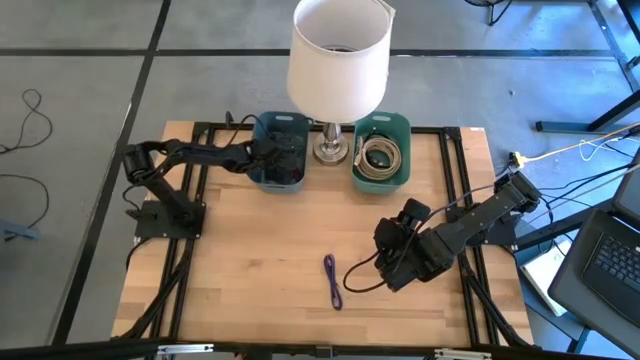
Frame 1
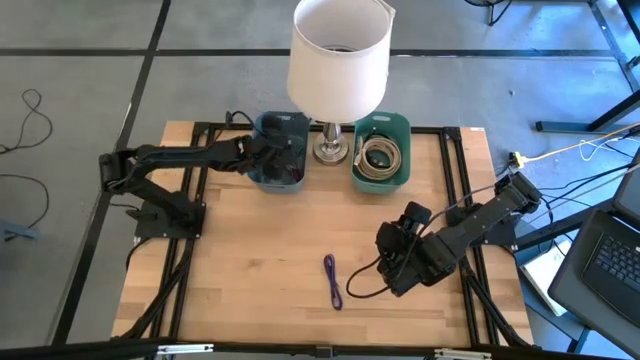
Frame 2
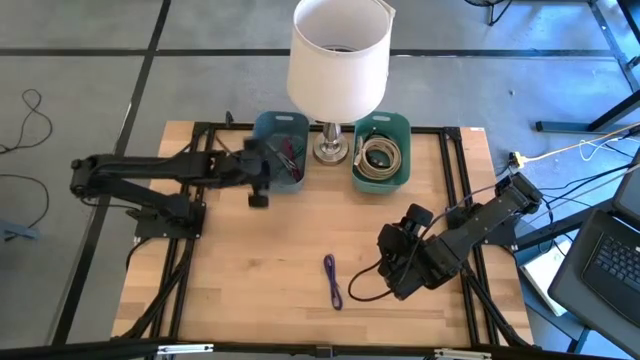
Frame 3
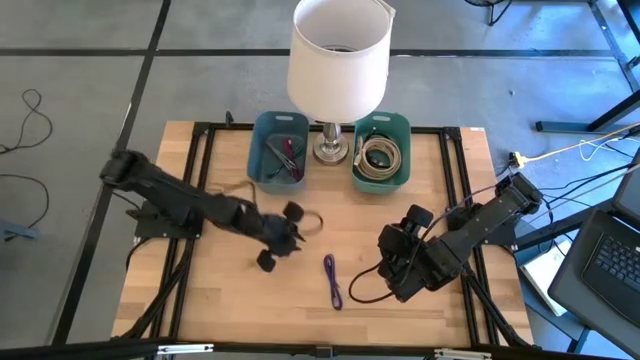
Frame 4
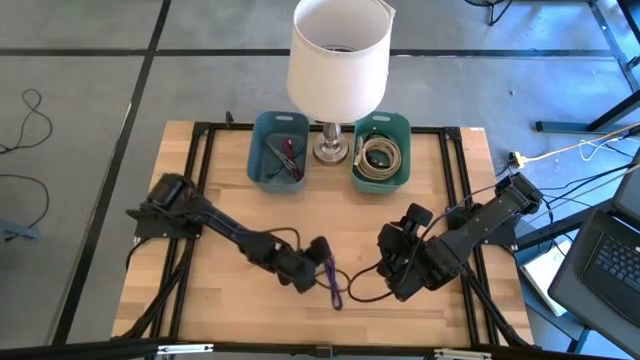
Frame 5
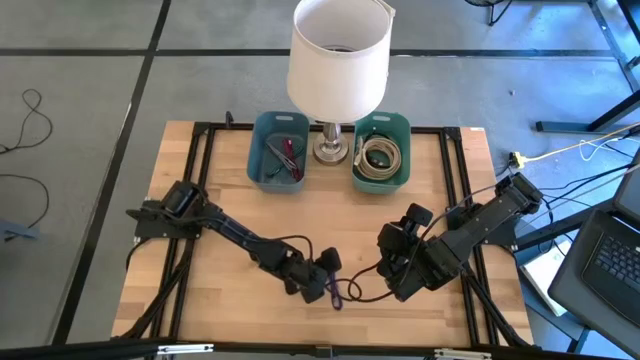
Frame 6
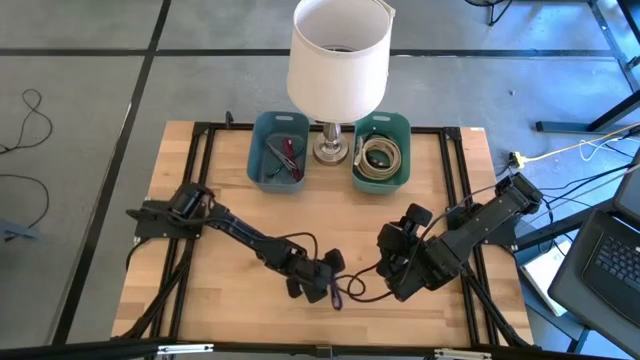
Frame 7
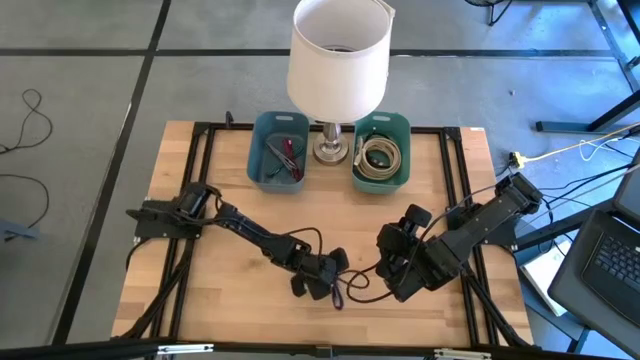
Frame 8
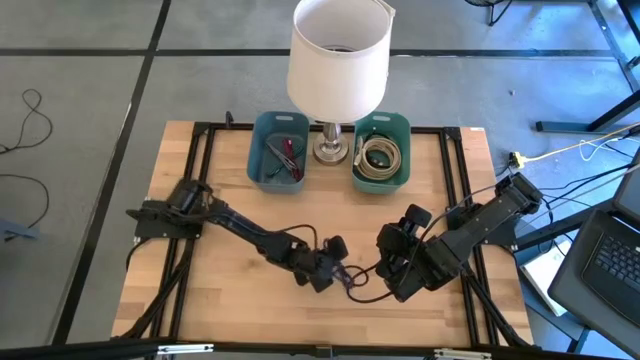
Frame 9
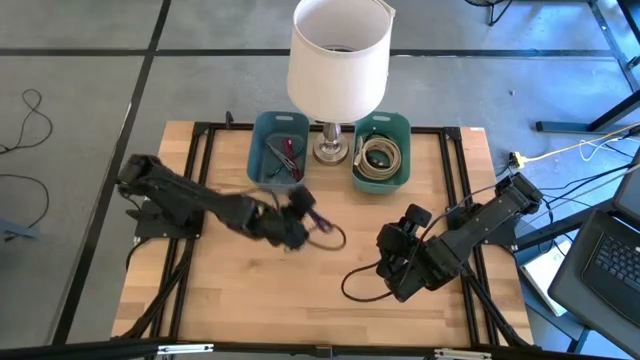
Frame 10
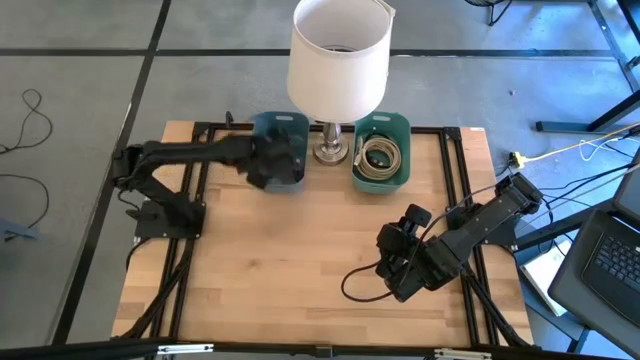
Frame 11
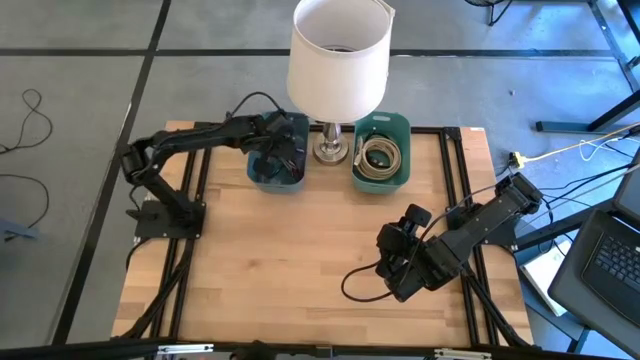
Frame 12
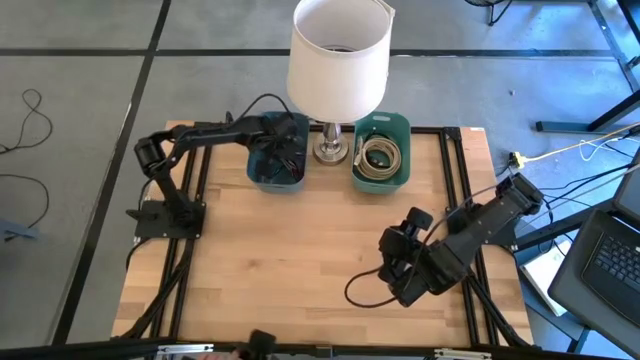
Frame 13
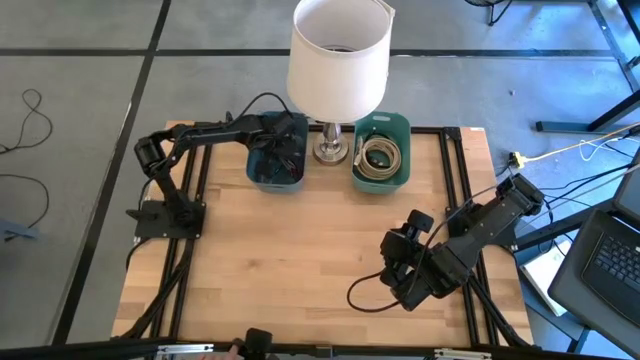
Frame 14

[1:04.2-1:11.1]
Put the purple usb cable into the blue bin

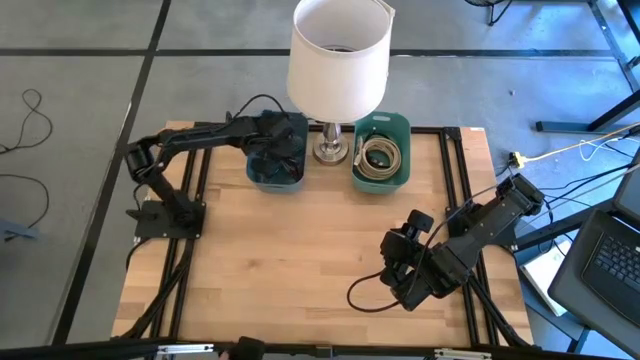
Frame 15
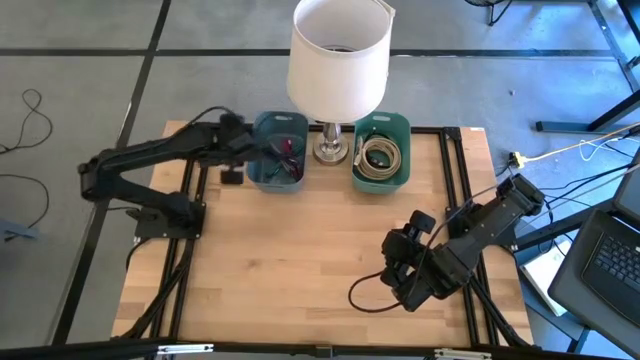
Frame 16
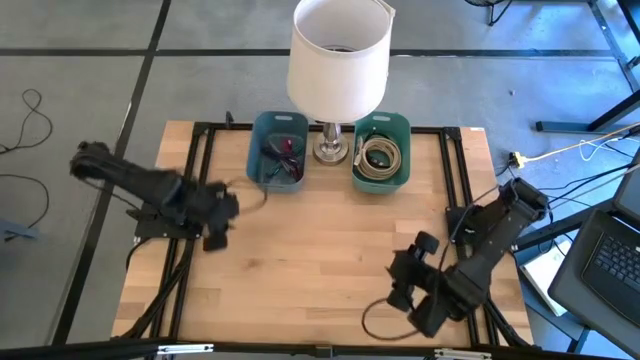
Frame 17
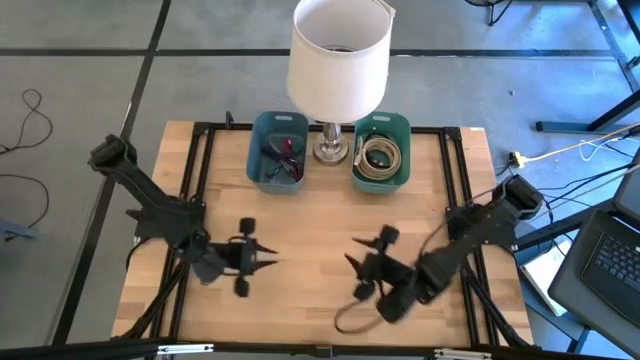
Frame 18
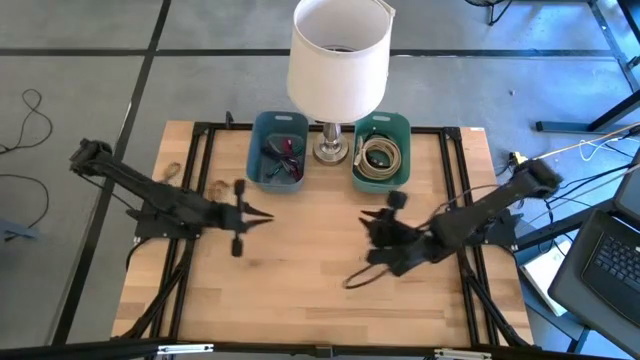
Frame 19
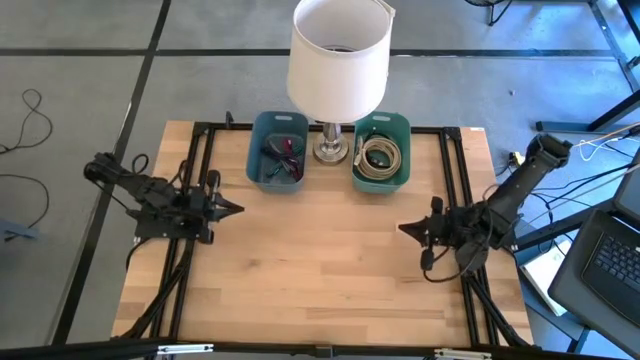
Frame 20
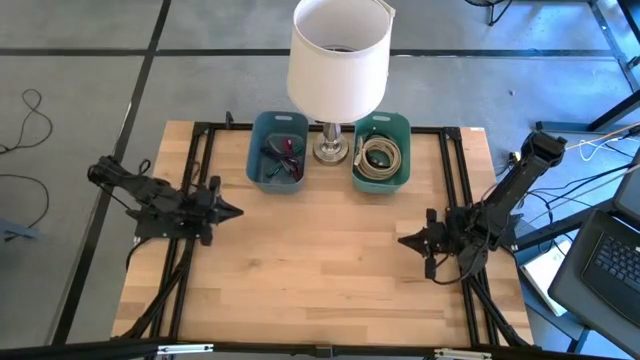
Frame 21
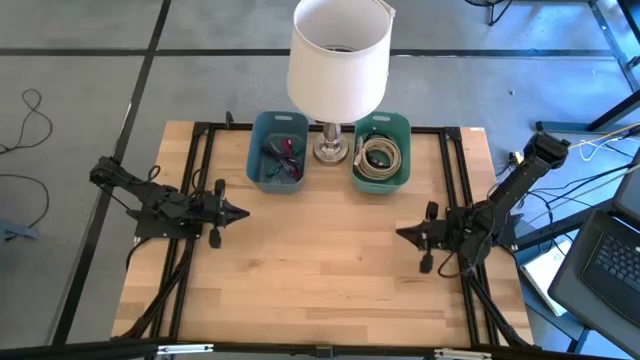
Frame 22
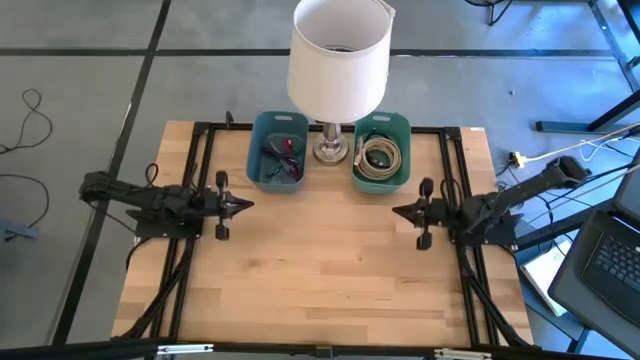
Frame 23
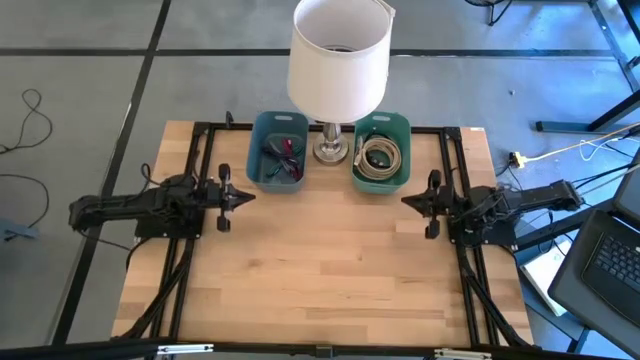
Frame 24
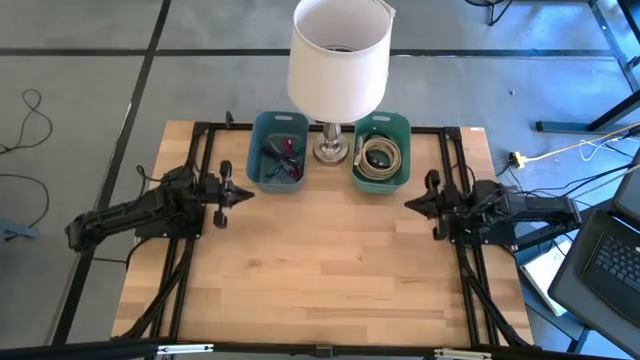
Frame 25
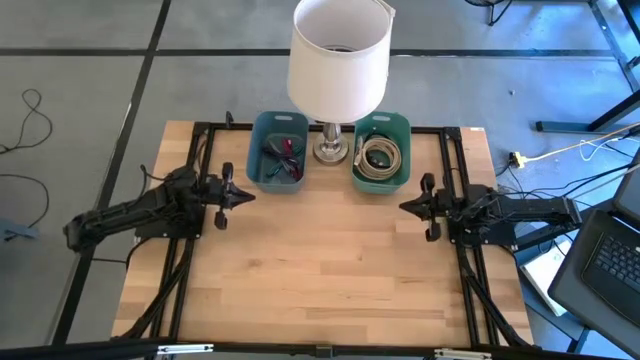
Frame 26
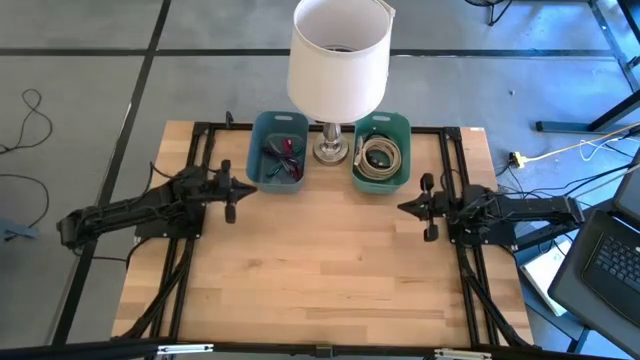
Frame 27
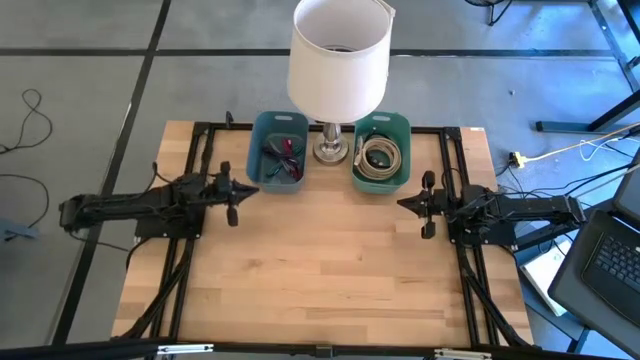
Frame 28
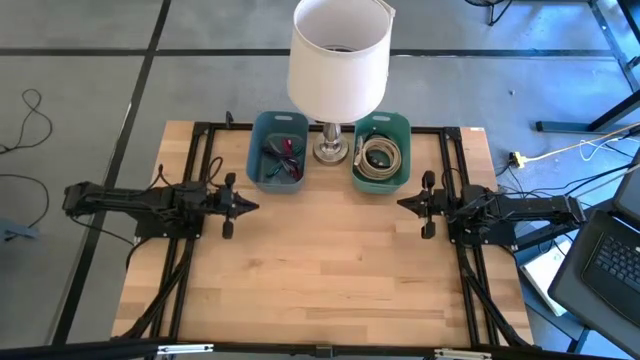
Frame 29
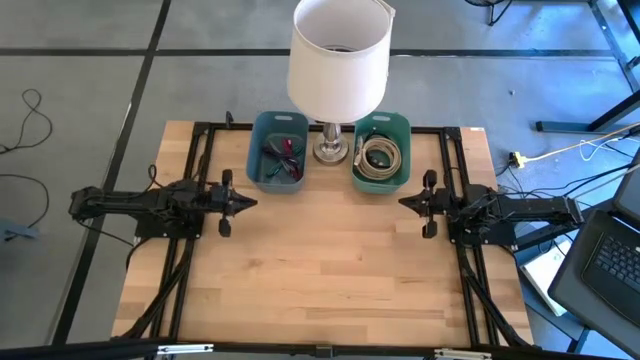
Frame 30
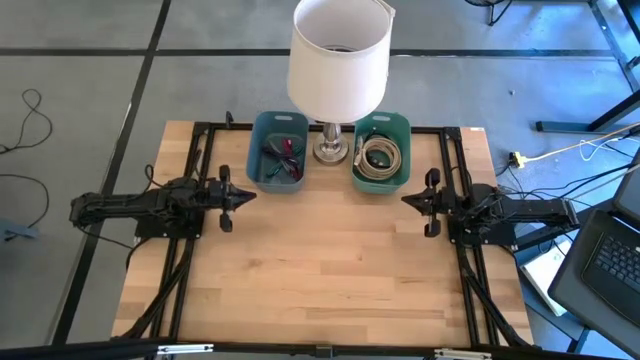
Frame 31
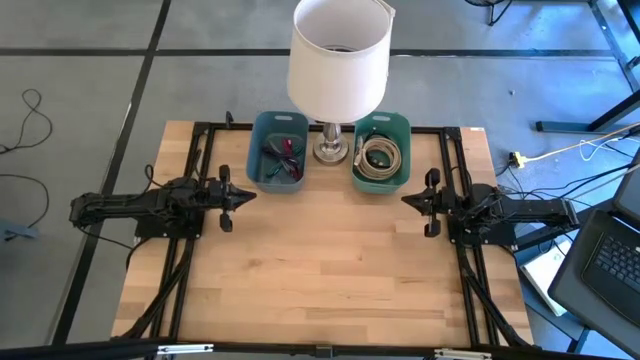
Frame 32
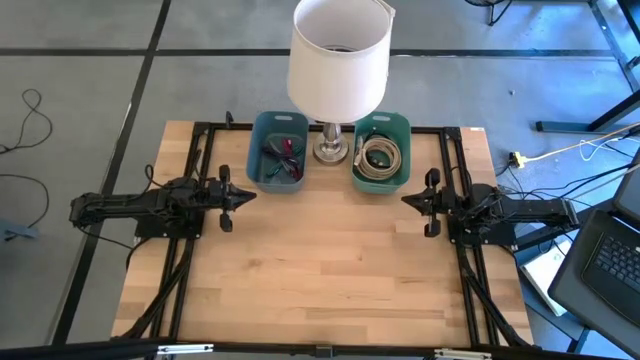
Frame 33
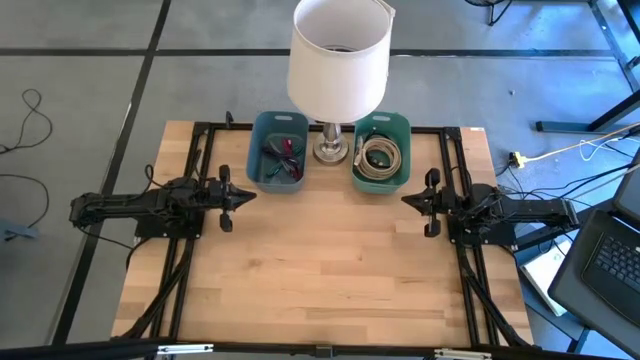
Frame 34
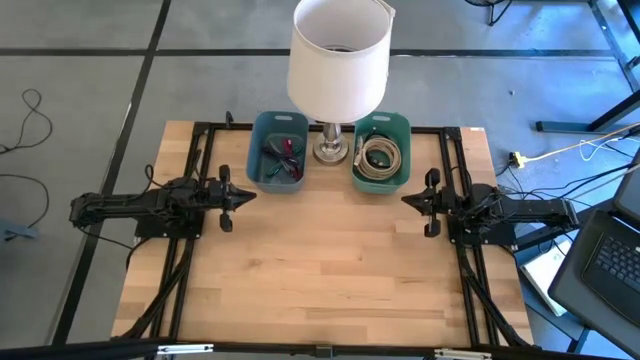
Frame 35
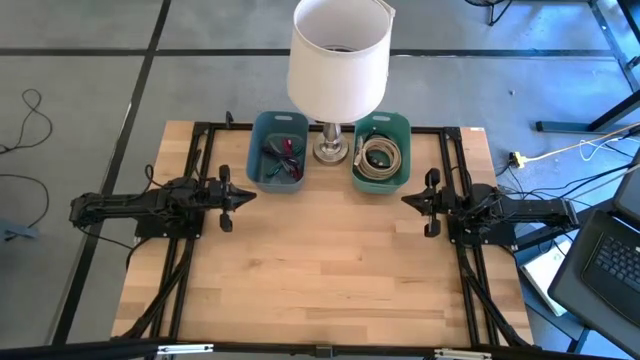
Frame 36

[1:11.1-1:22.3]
Return to Home Position
